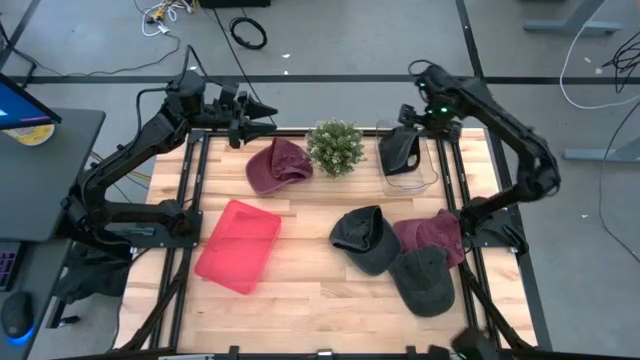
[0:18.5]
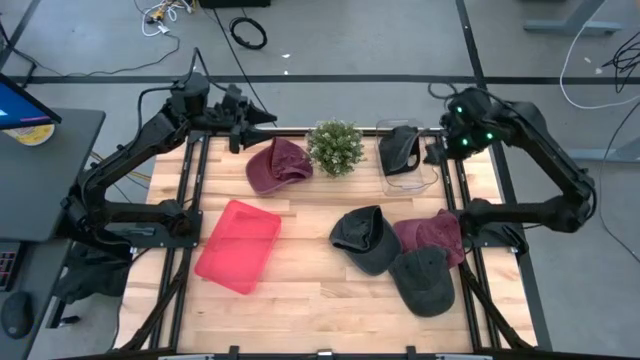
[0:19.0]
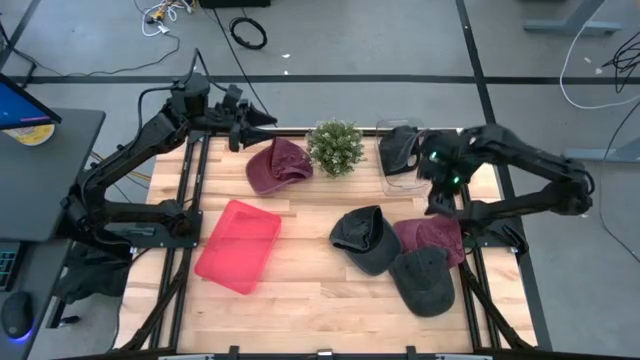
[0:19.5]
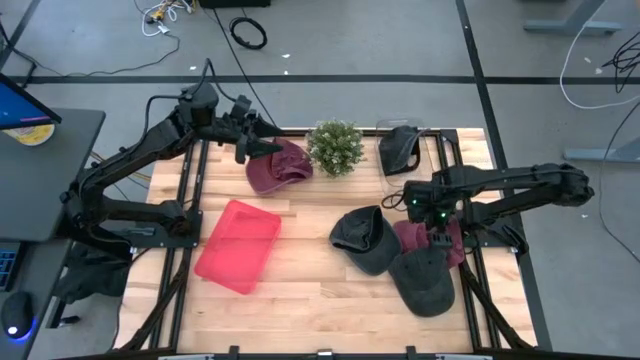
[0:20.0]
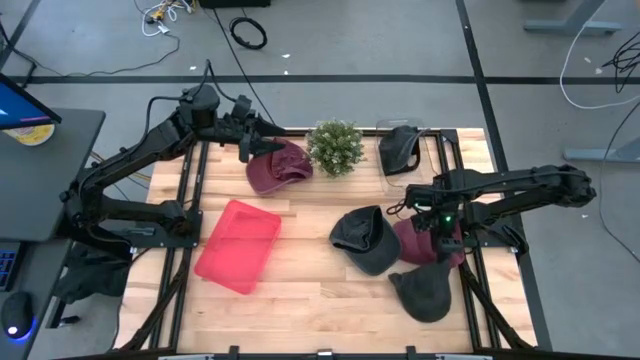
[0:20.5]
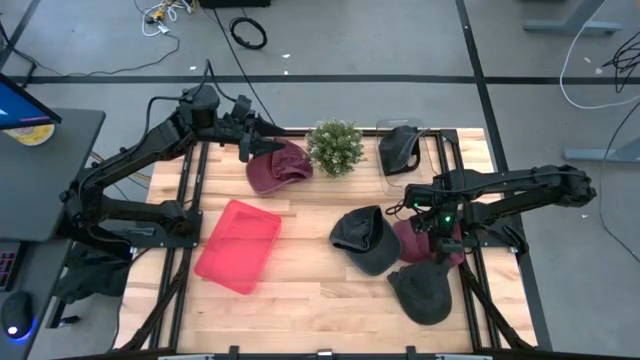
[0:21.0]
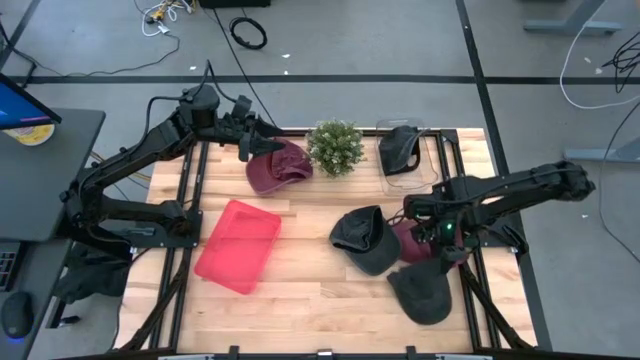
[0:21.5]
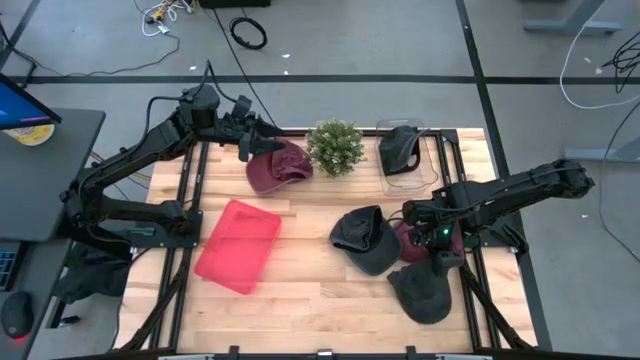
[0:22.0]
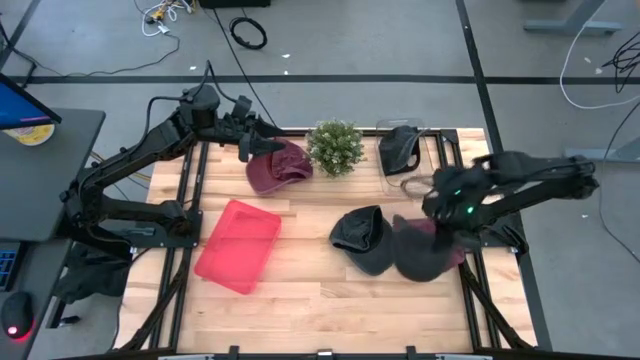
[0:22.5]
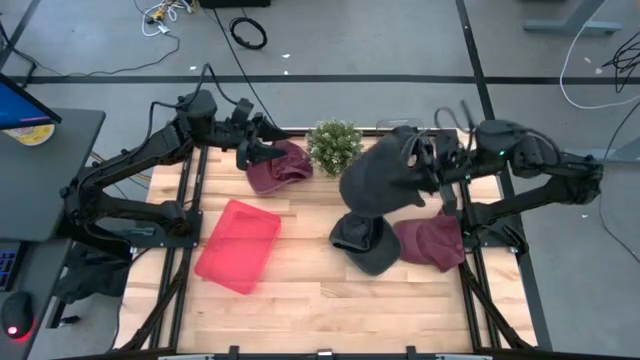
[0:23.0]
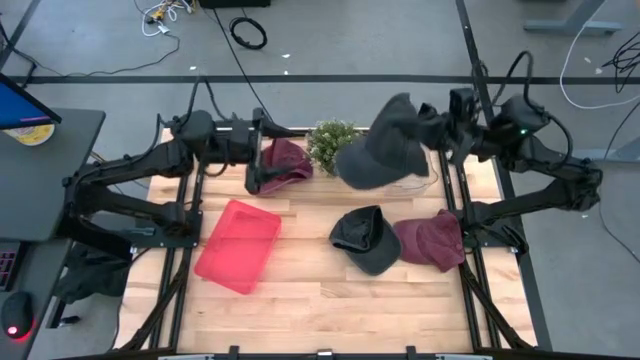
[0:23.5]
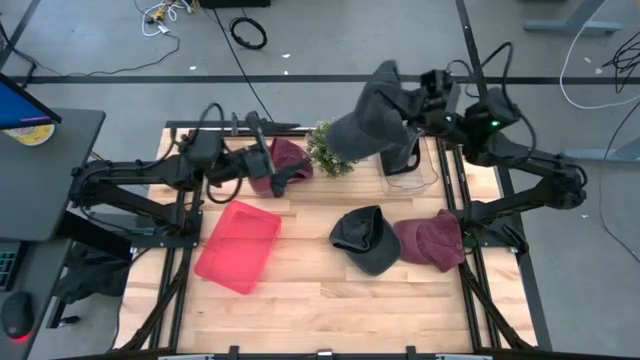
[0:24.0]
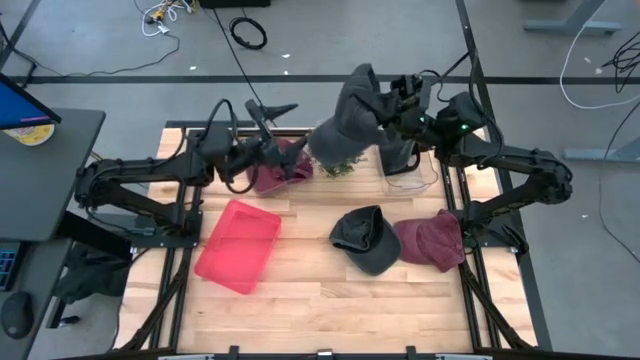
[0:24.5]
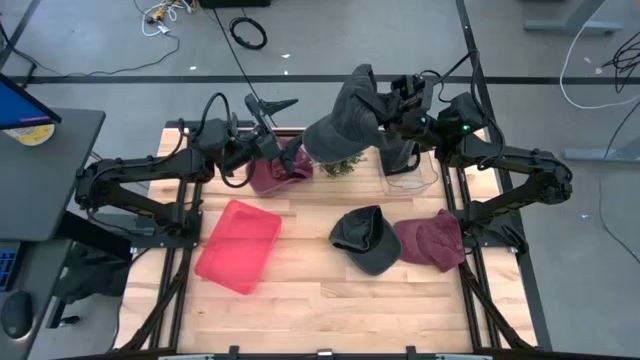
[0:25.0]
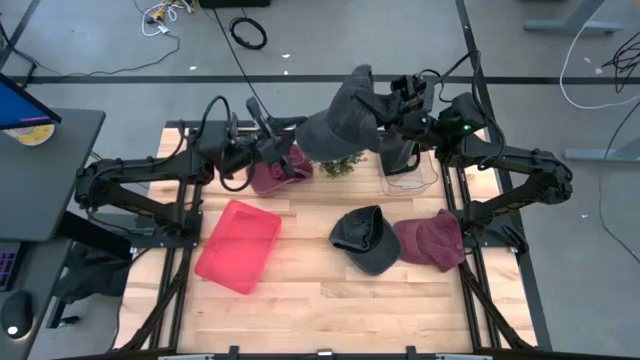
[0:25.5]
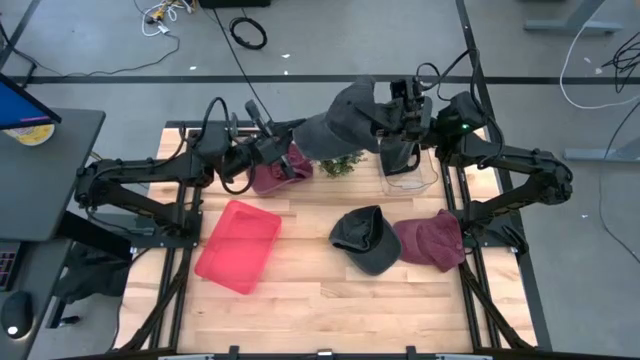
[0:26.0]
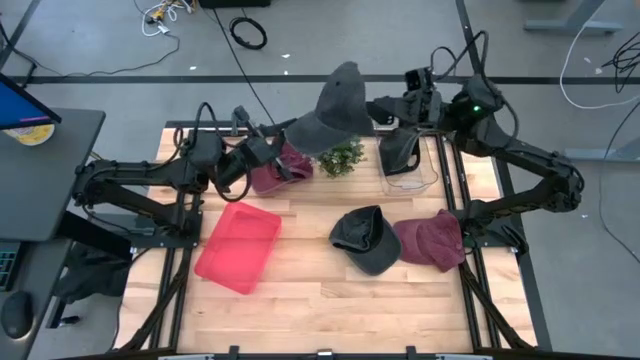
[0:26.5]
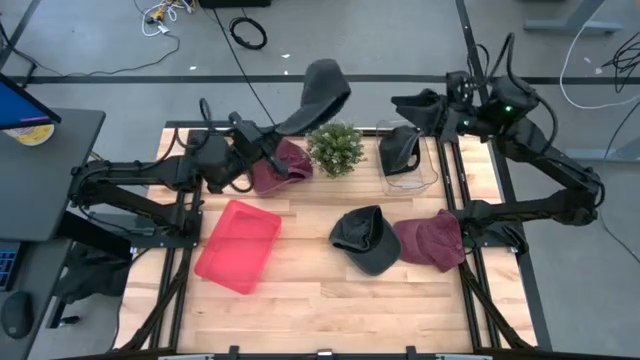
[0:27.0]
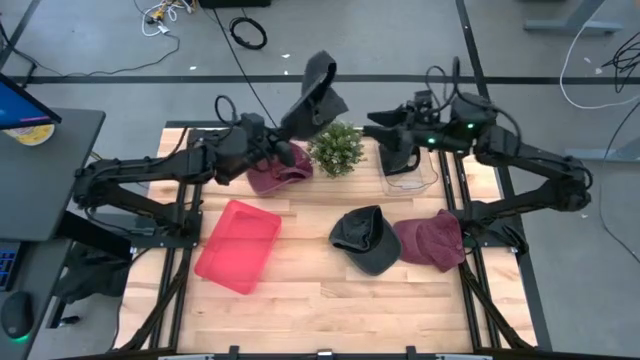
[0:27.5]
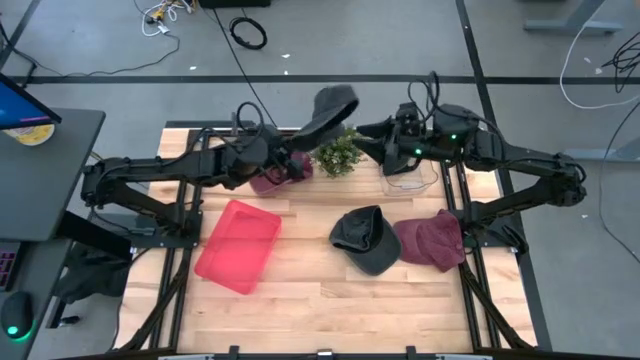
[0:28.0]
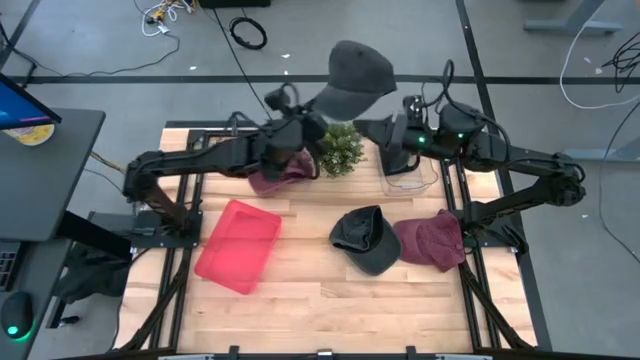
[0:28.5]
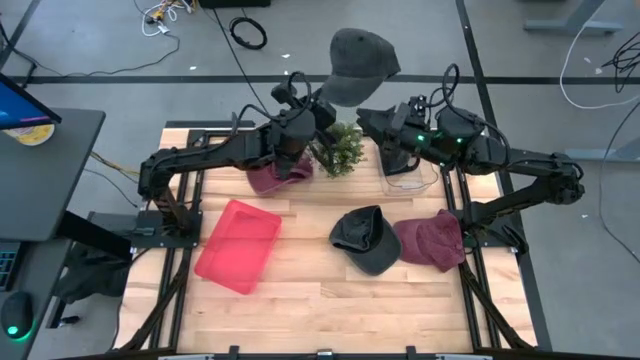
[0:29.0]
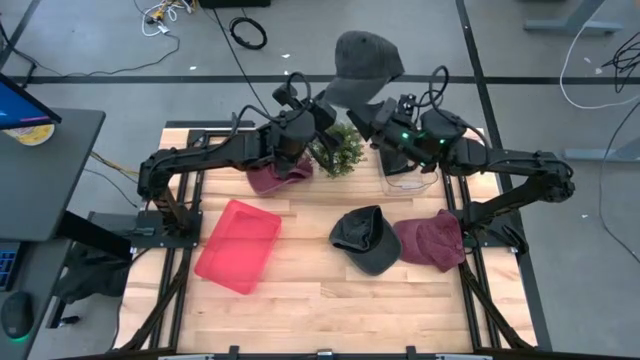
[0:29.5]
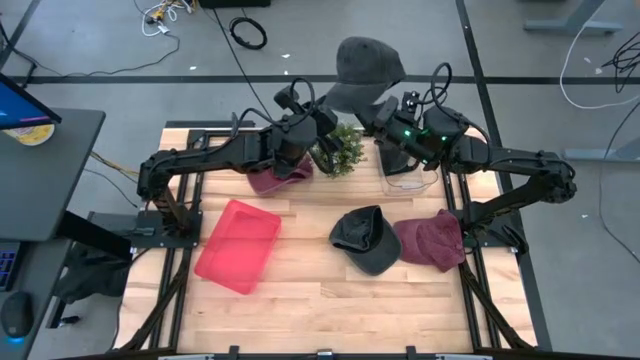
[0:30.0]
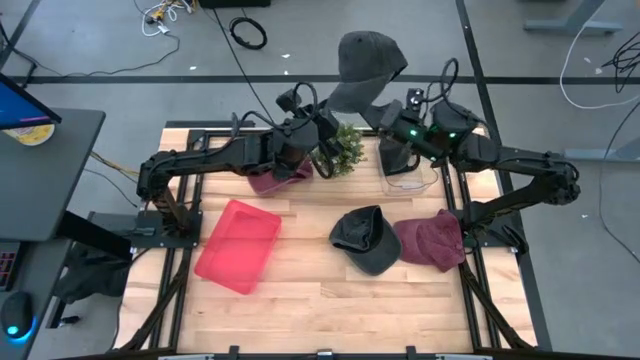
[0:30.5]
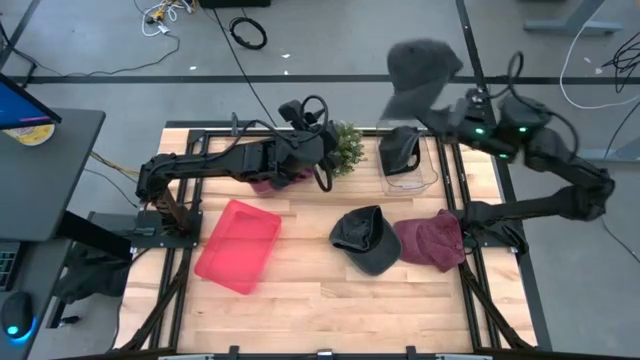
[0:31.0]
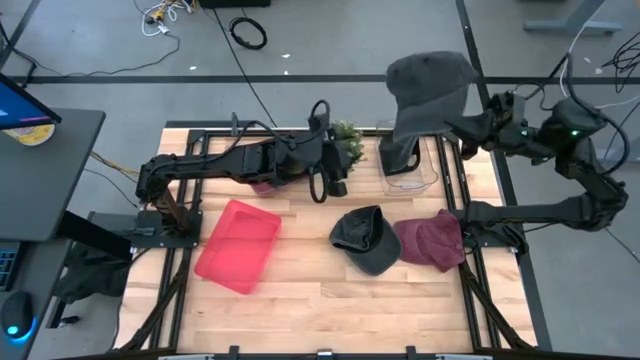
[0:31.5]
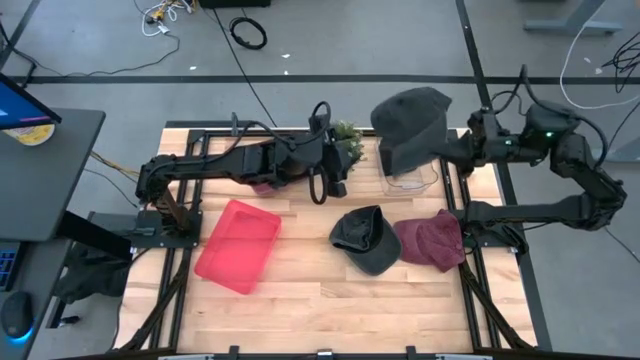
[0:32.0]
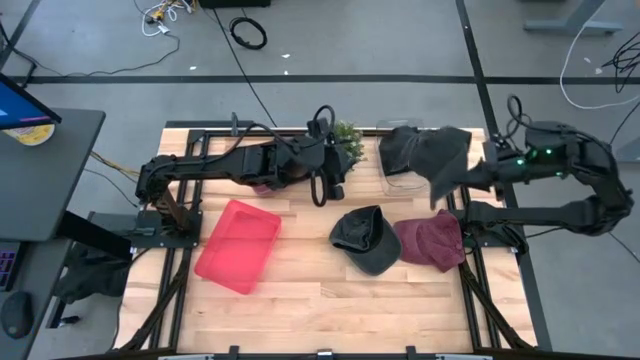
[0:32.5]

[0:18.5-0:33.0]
Task: Pick & Place hat
Put the bottom black cap into the transparent bin
